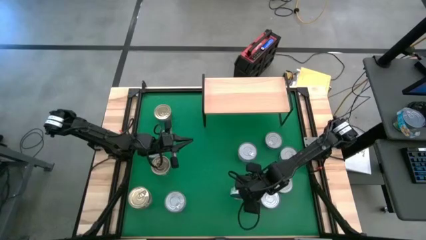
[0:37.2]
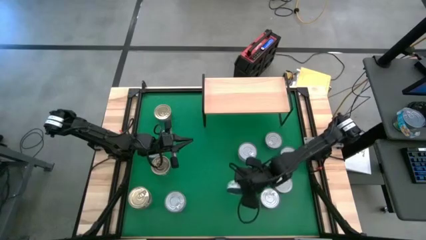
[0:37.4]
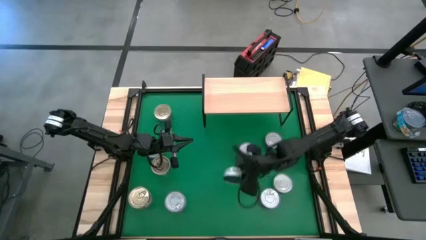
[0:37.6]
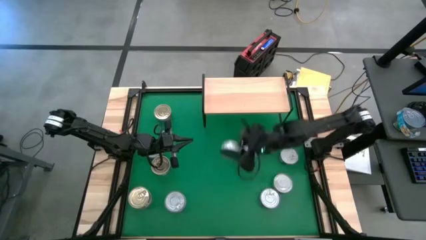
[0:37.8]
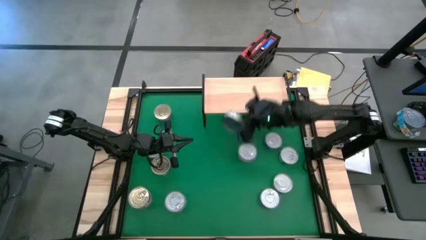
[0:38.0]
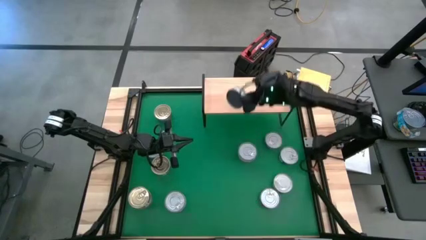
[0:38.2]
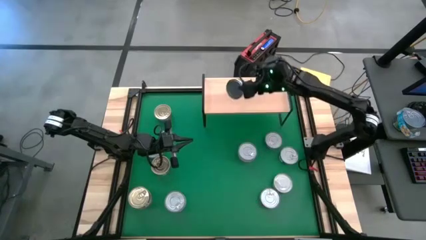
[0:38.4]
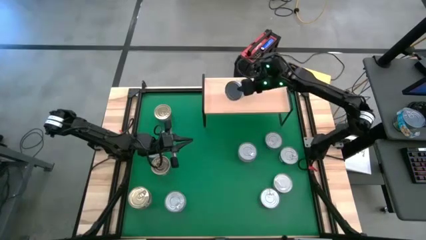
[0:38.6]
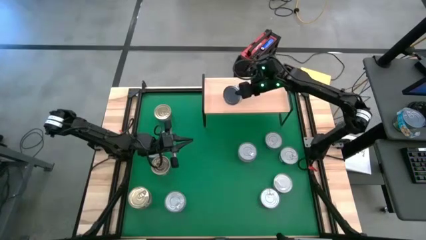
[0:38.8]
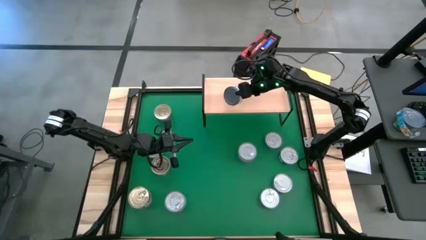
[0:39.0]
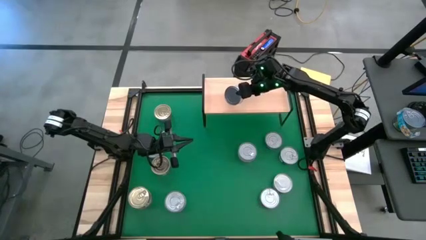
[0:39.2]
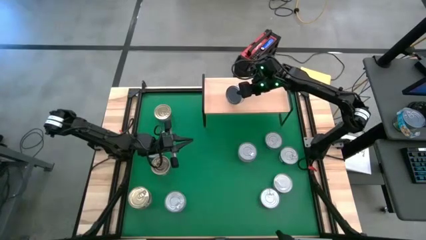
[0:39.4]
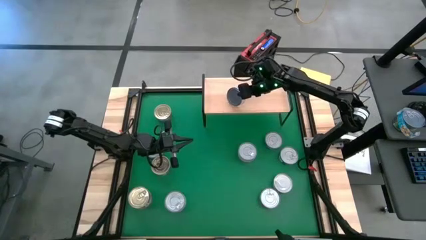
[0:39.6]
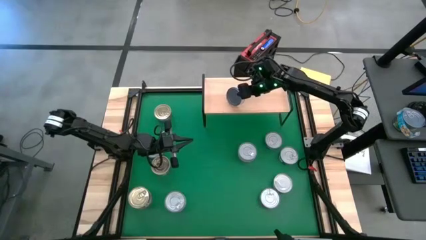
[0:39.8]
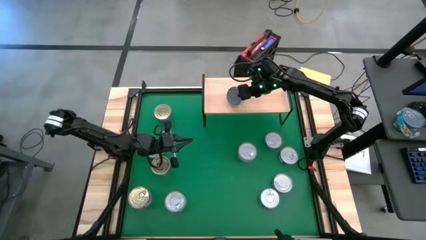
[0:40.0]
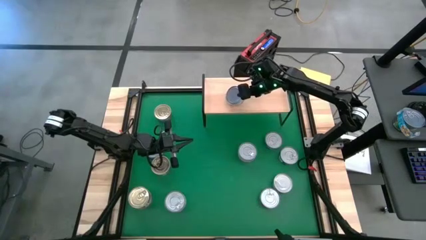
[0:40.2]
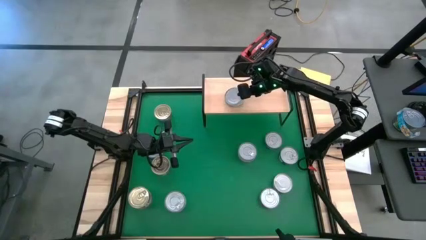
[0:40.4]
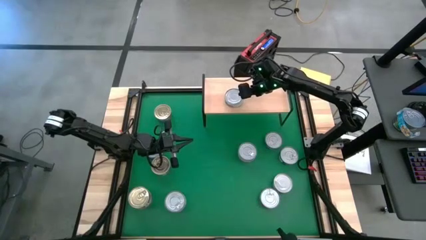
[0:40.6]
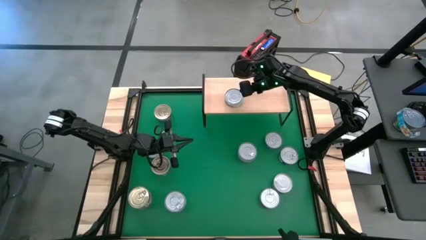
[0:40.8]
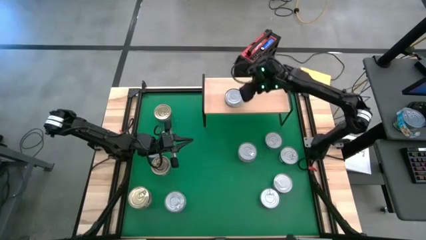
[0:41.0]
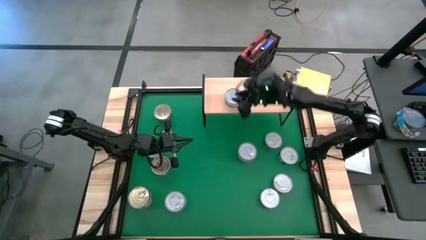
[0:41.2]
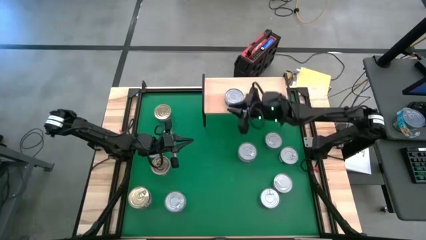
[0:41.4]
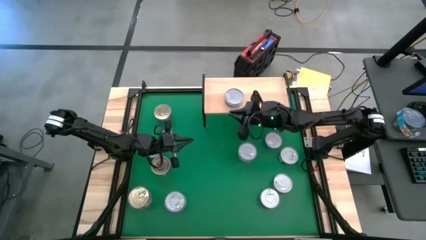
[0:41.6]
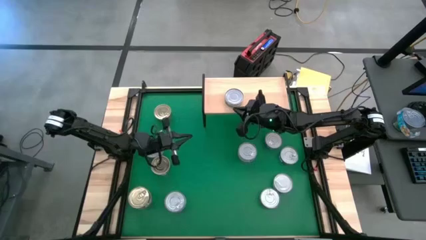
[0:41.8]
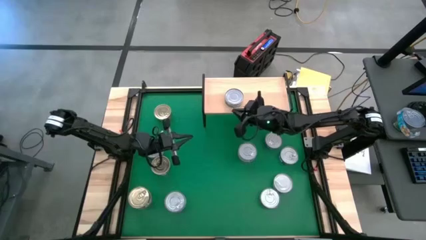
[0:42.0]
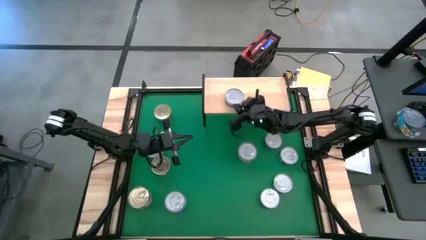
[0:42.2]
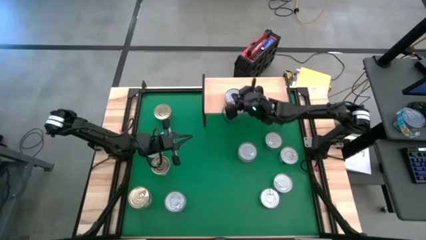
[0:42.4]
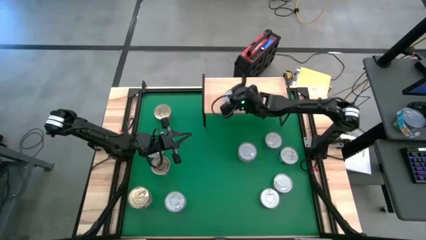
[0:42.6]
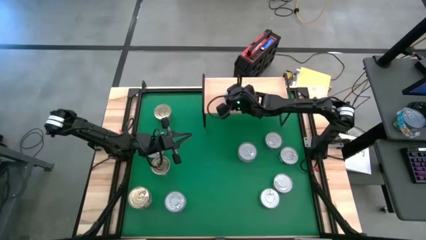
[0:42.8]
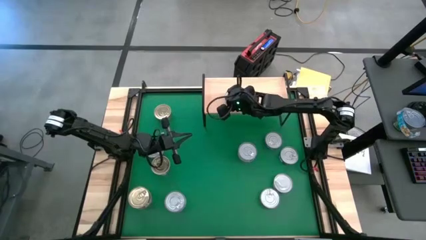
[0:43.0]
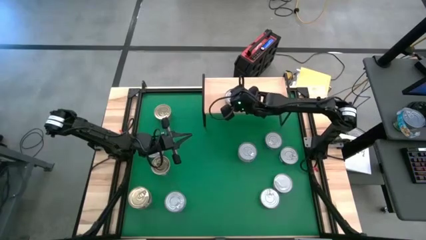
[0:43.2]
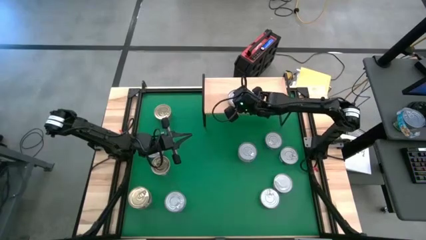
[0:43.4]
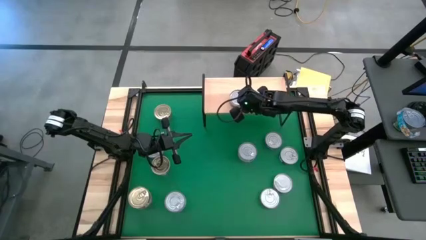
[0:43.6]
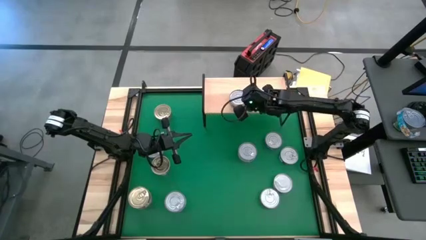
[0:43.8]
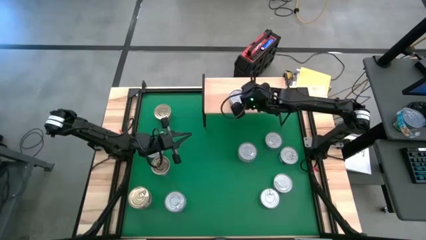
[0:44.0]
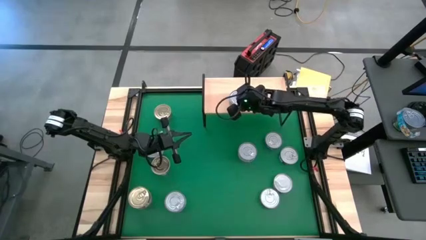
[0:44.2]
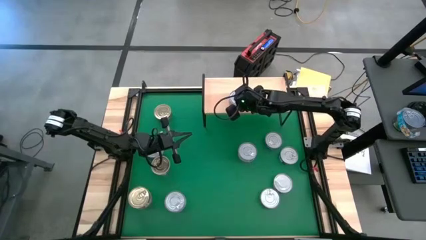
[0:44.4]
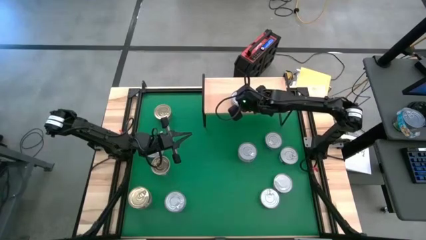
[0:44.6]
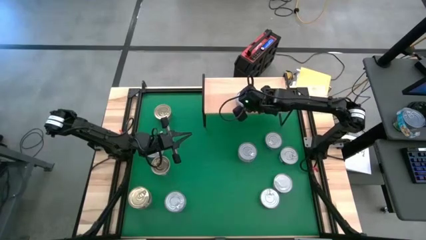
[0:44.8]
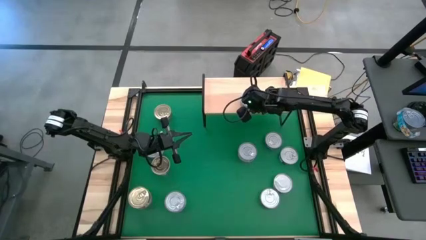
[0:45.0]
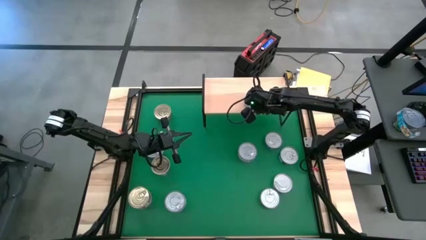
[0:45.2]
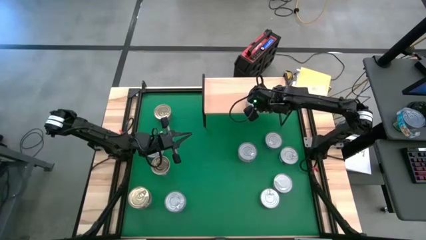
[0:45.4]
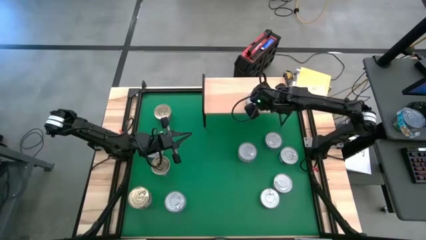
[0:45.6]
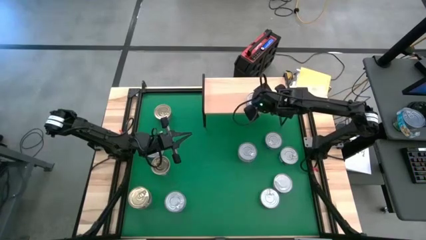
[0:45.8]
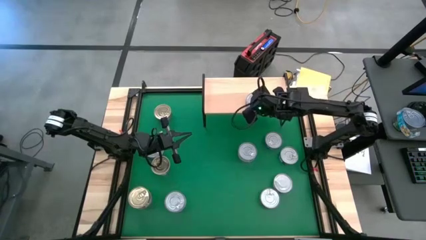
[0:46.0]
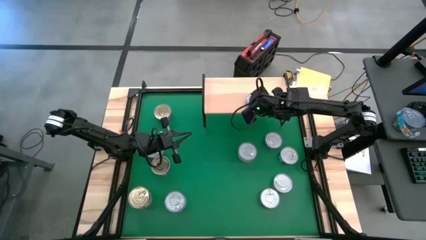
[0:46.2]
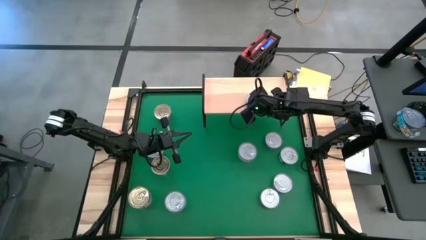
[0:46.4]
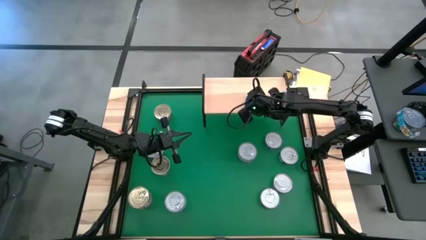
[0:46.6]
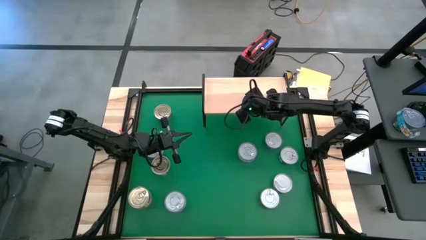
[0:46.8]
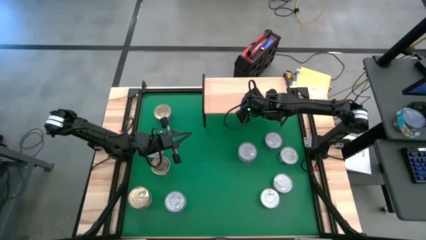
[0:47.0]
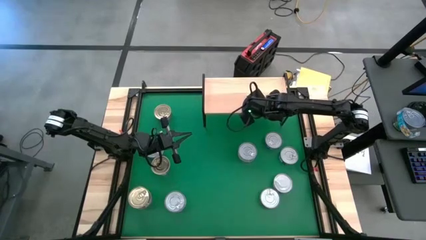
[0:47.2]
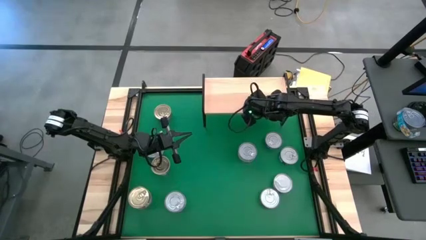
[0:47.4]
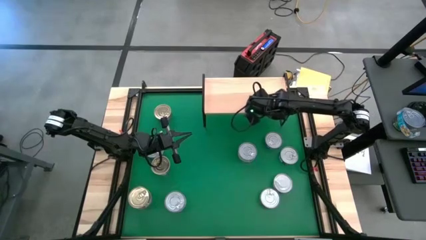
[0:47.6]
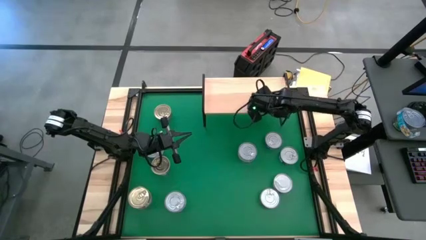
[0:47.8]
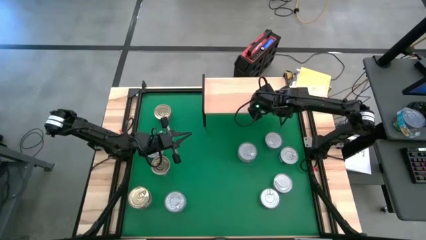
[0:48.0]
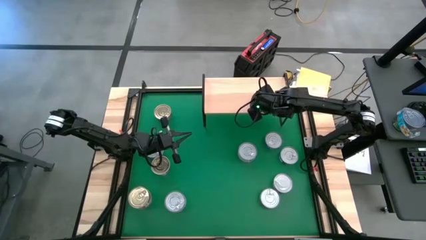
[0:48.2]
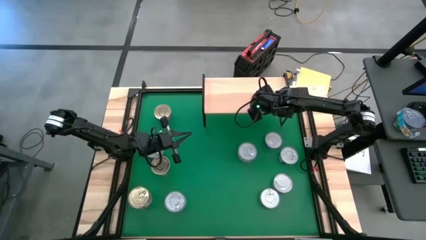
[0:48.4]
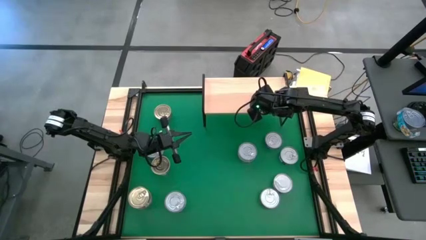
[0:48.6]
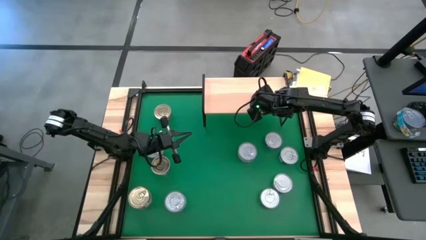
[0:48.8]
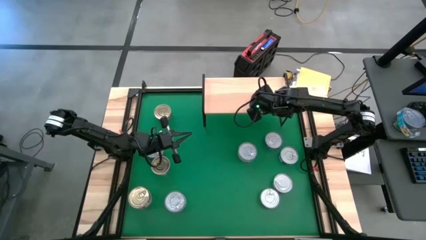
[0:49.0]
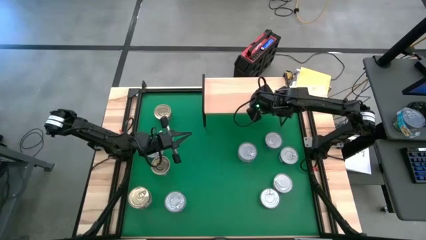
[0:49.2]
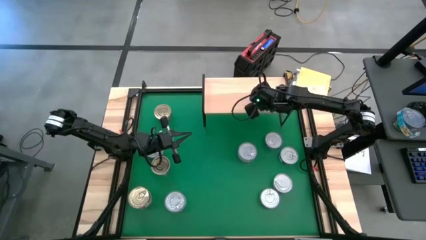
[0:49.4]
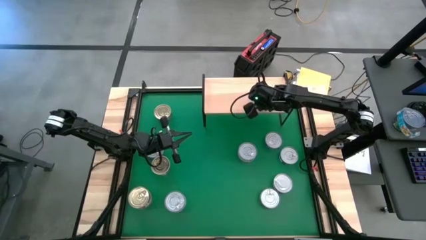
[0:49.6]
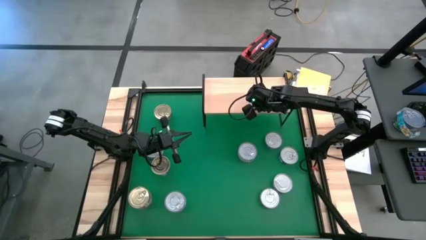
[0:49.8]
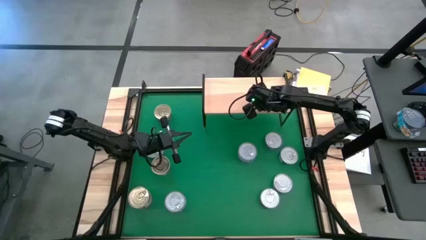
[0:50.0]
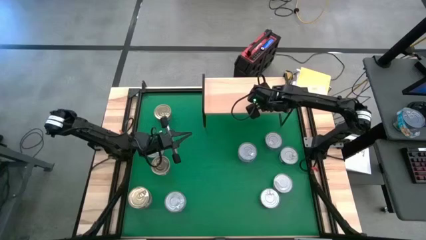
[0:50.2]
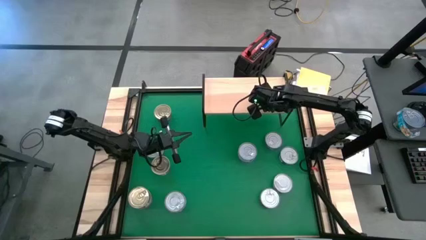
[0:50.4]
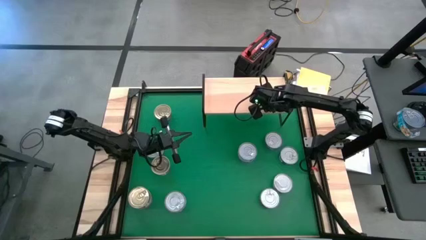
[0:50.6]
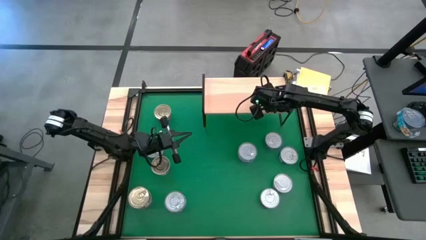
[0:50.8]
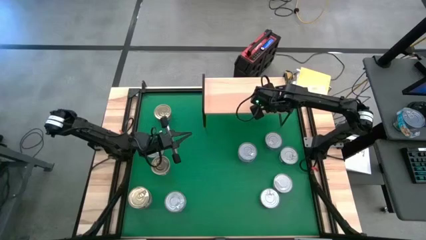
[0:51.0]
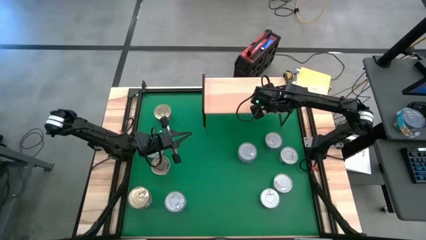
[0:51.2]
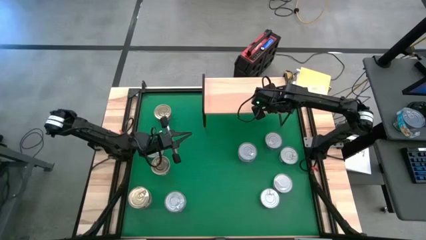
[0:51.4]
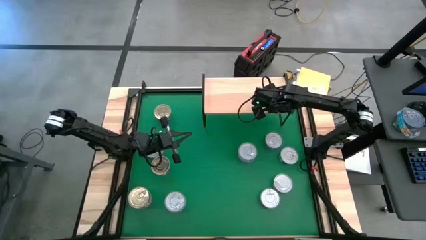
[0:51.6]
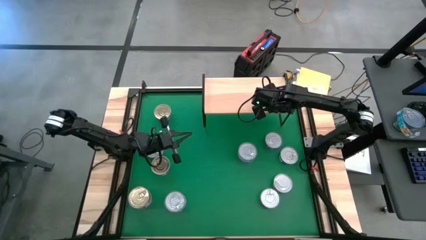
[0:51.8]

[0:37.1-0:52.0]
Task: Stack canned seafood by type on shelf
Put the green tuna can on the shelf
